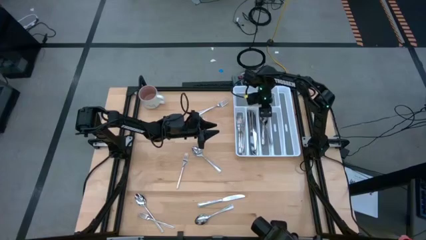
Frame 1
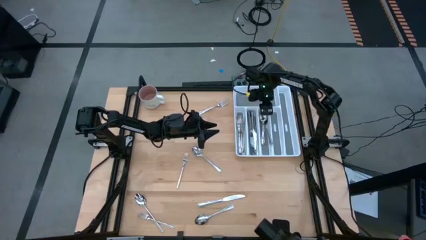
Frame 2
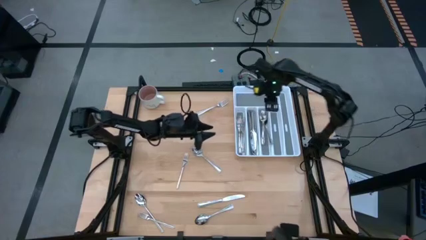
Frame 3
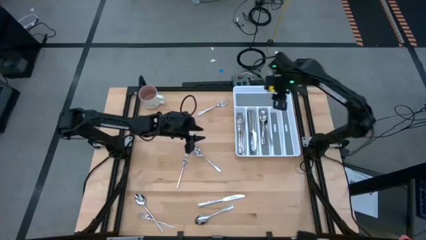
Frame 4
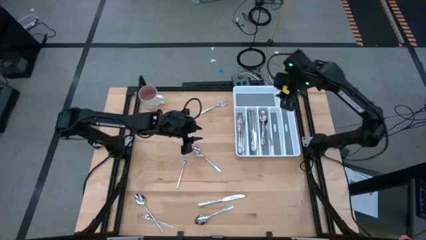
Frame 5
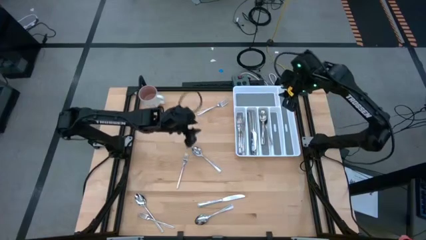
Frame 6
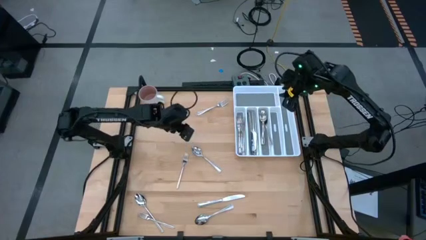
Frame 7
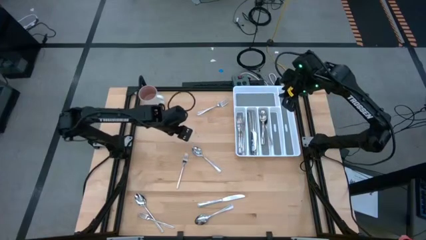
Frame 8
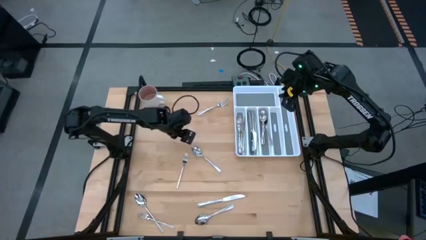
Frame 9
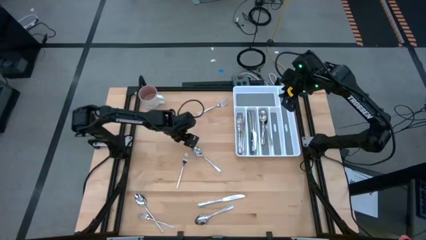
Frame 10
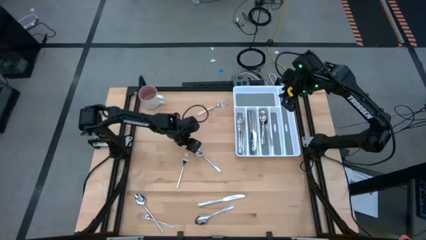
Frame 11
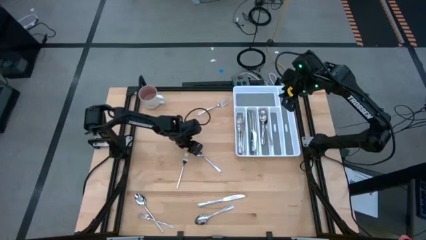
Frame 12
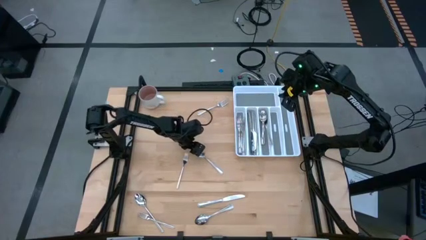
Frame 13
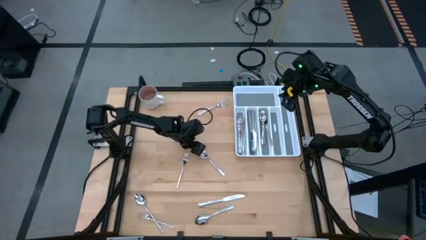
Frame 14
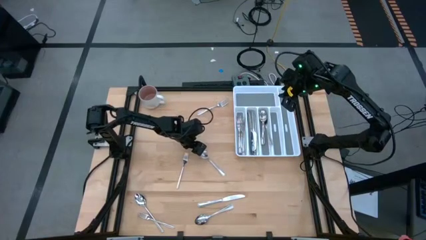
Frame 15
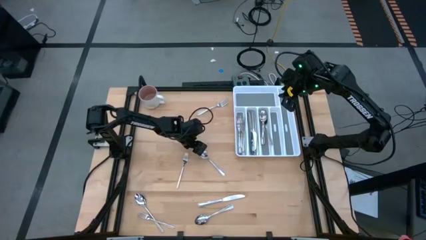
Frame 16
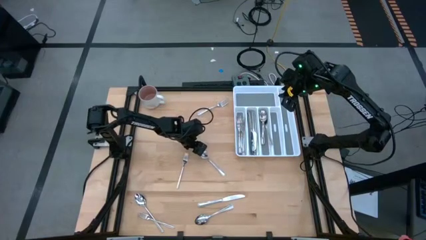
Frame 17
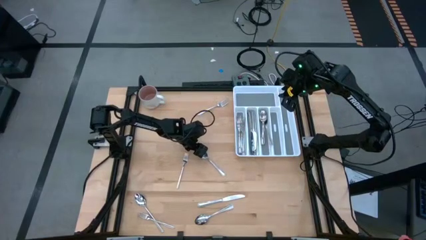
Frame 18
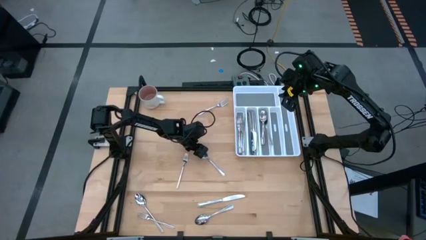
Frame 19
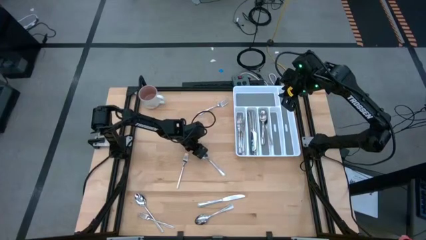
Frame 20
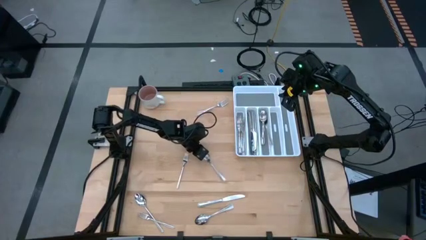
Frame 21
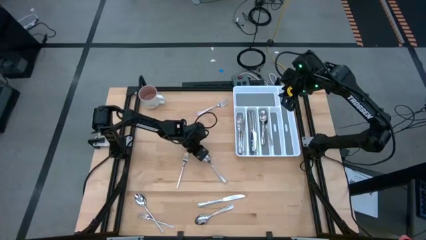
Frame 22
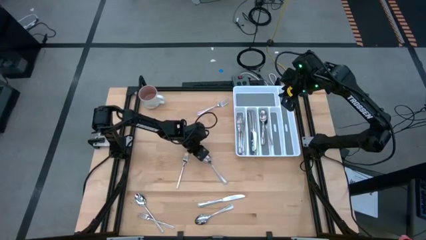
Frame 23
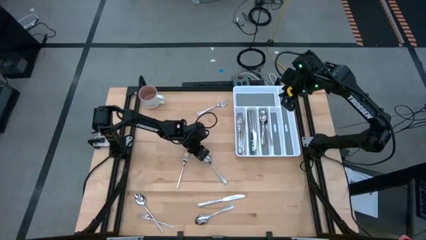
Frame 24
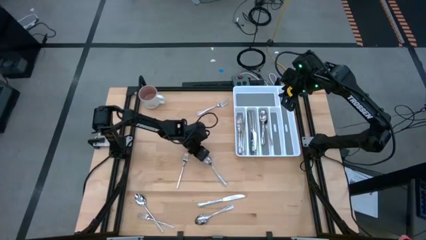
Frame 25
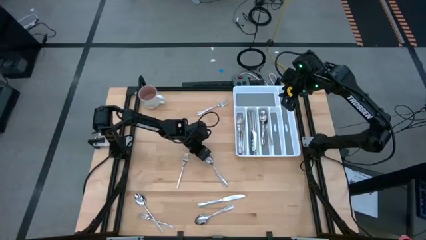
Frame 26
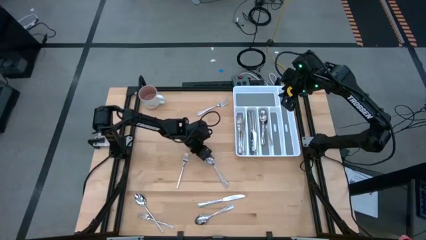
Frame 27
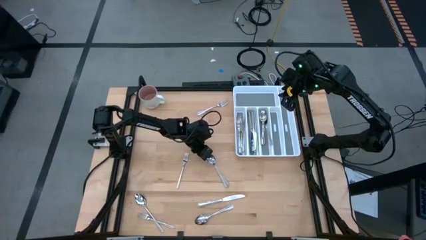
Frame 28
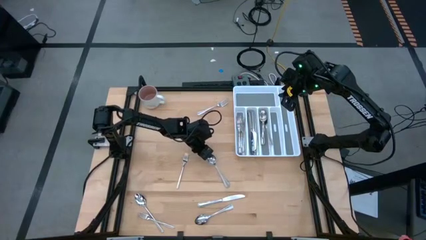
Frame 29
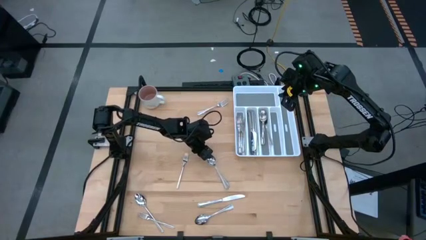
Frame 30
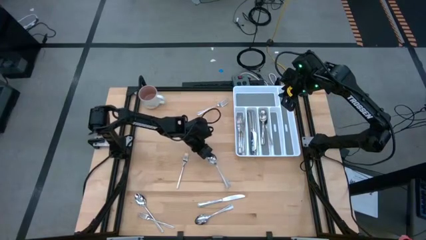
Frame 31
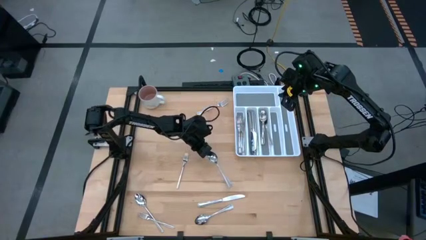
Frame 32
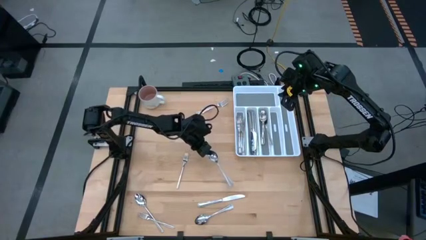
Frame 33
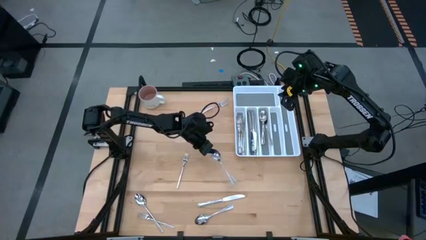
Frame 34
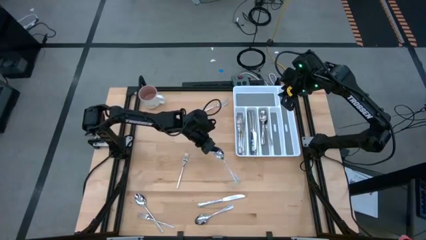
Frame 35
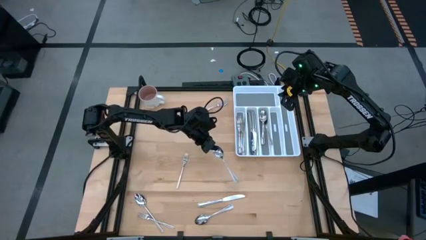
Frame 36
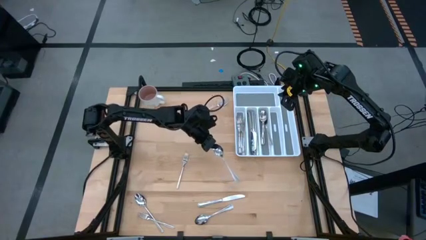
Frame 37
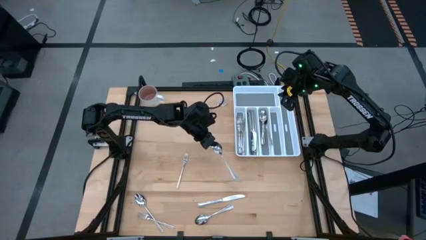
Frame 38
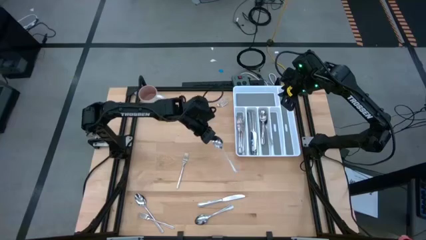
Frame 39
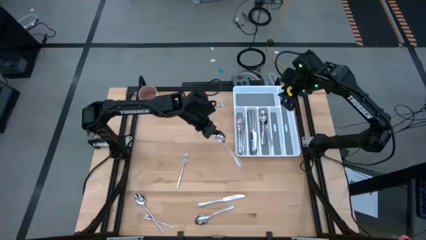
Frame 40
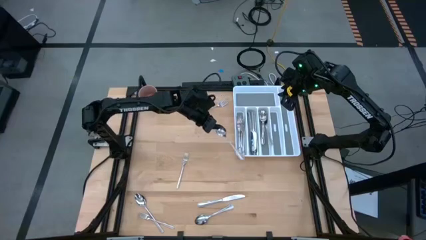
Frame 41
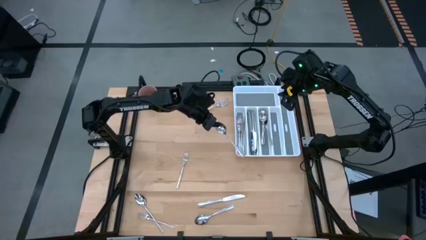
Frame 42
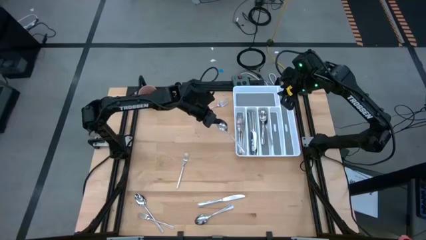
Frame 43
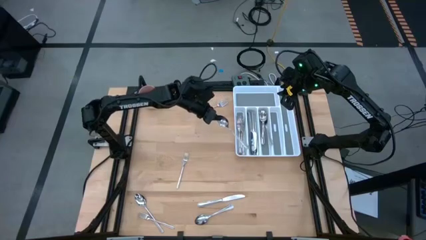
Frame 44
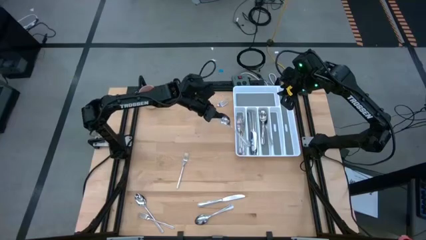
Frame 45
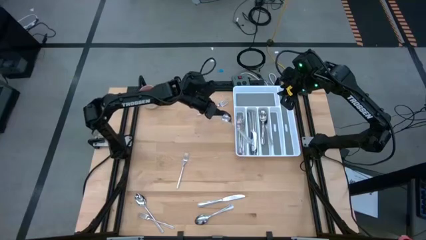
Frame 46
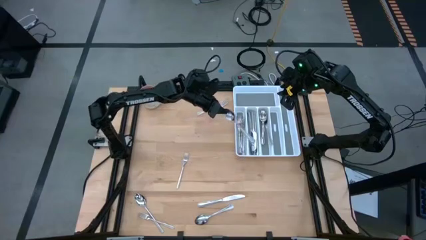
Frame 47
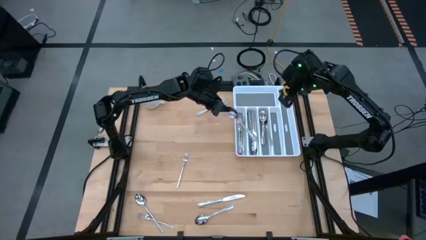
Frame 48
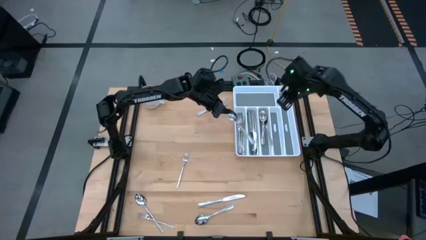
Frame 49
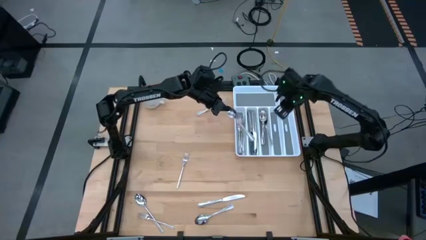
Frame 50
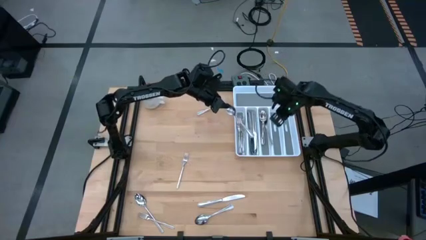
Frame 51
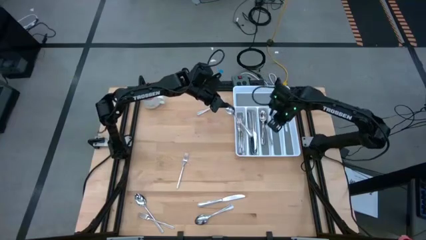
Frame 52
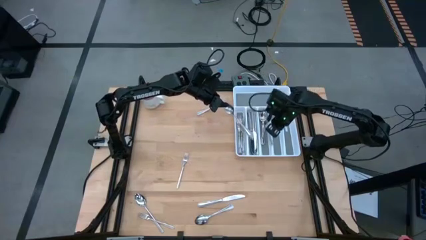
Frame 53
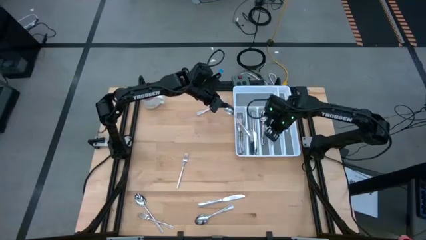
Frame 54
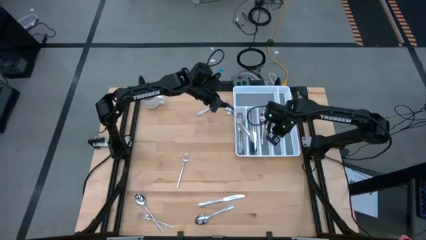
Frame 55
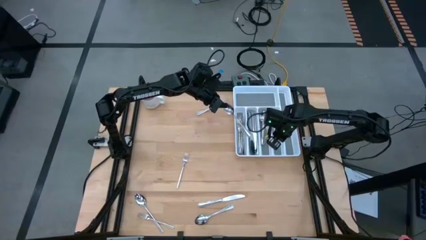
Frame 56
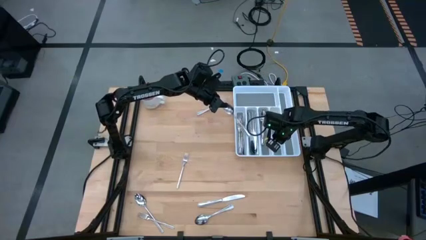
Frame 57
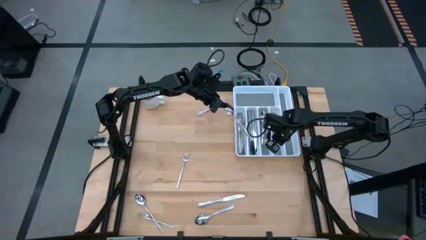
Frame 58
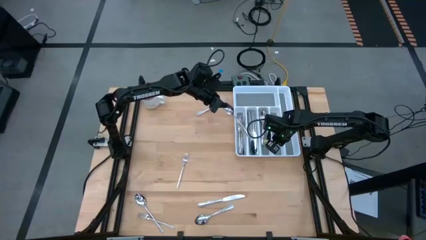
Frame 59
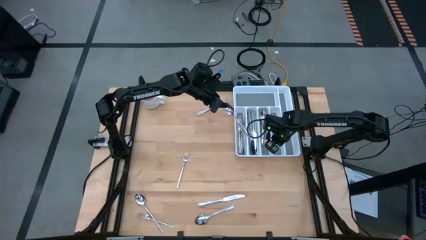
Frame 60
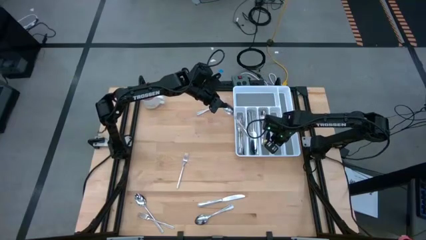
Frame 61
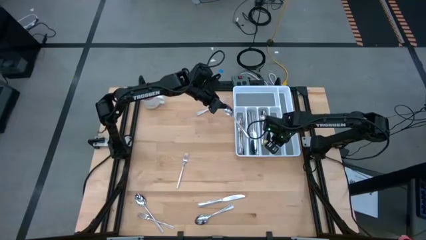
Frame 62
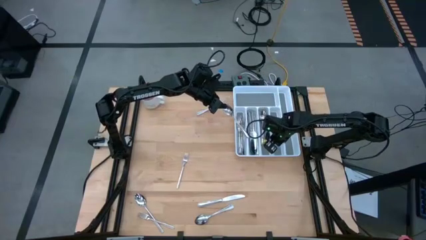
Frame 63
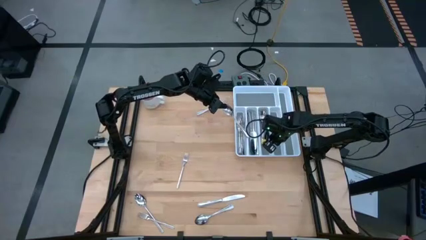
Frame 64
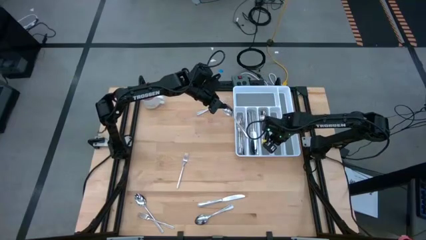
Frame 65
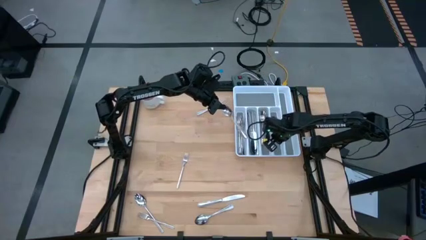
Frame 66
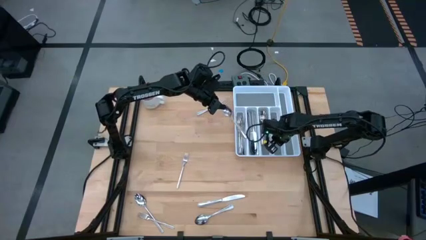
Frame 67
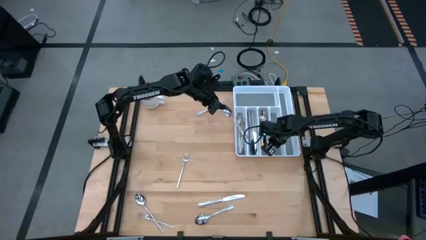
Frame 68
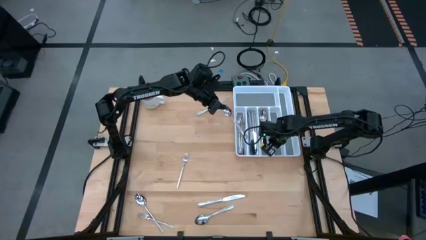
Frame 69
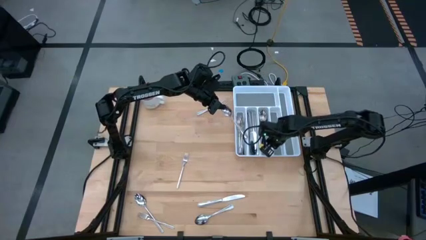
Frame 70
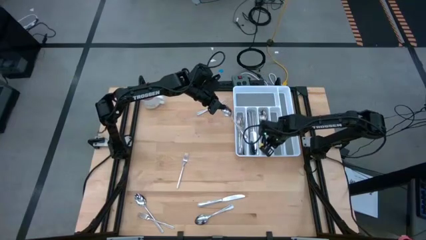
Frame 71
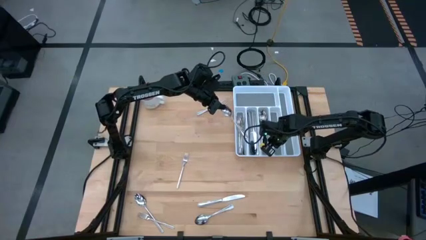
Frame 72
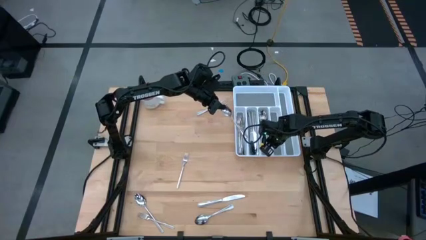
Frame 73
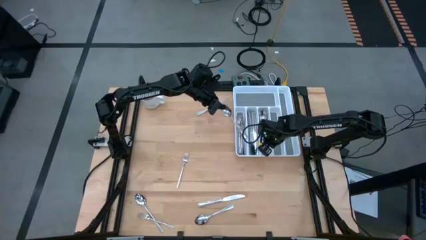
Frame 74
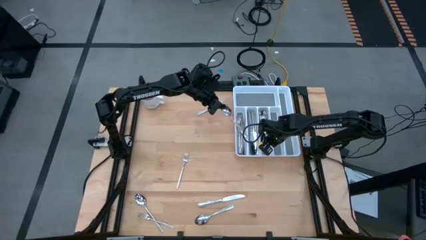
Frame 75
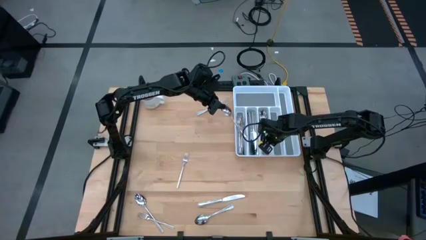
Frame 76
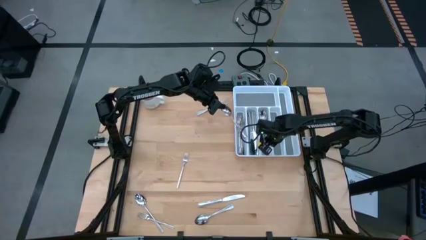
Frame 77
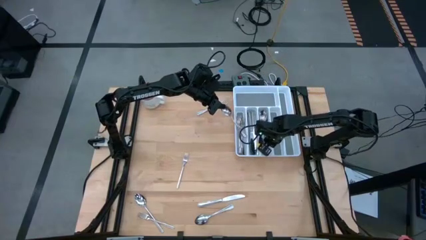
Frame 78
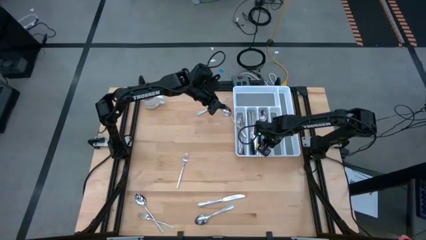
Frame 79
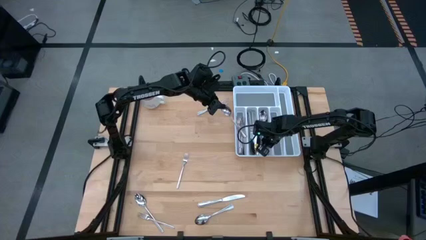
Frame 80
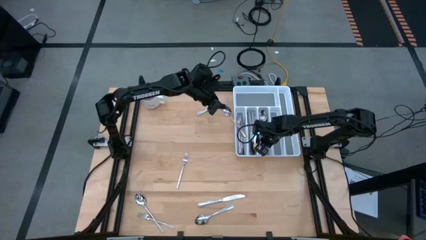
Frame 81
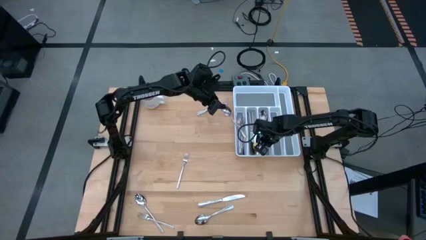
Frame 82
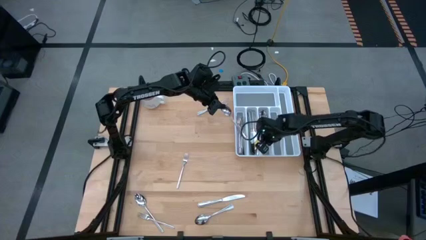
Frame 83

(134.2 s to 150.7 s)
Task: Sort silverware
Put the silver spoon into the middle right slot of the white silverware tray
